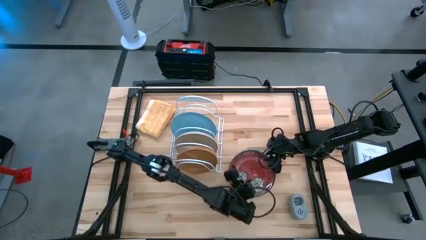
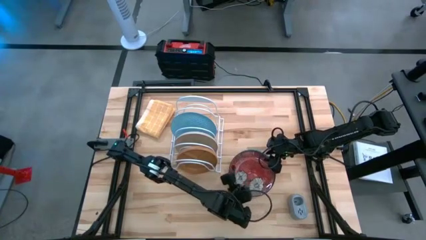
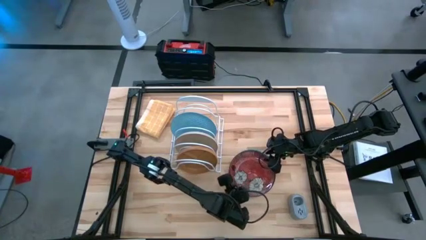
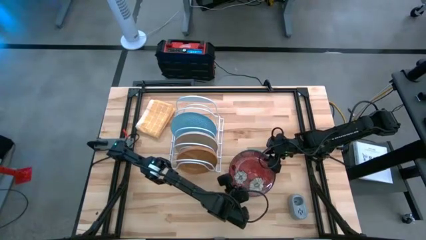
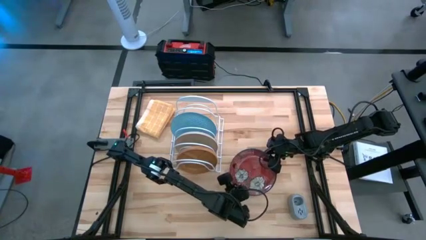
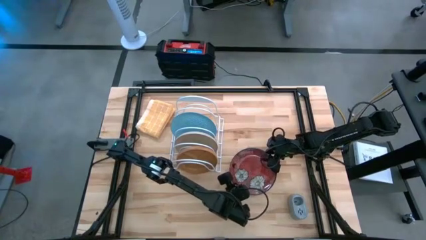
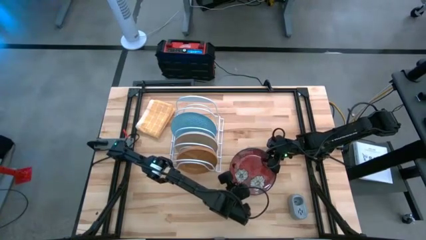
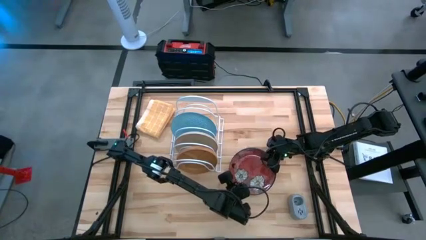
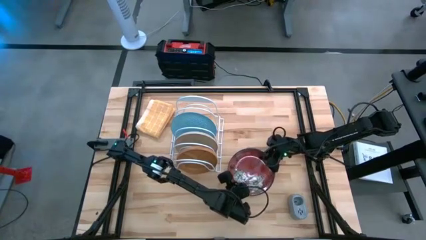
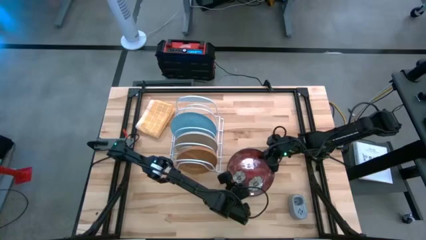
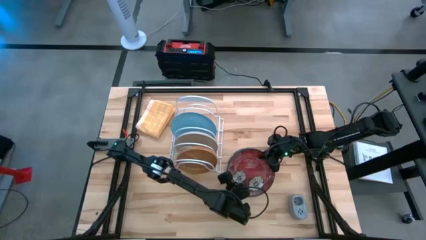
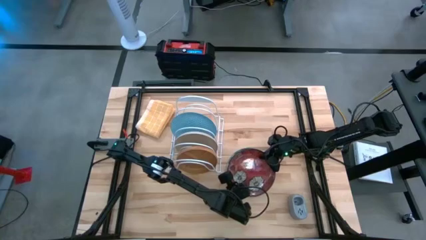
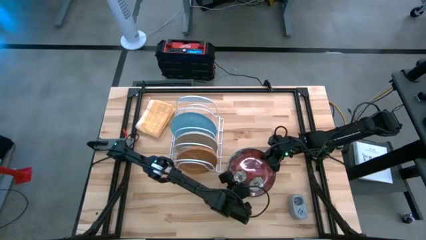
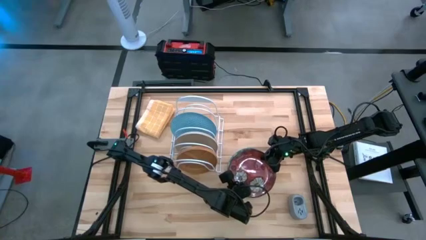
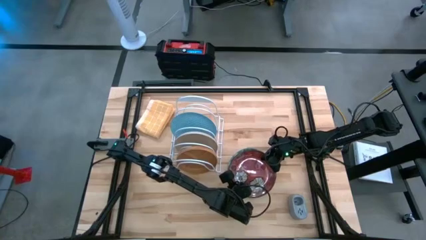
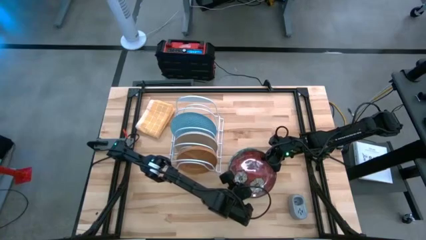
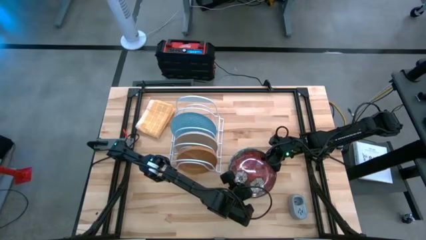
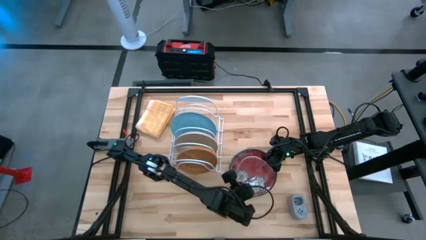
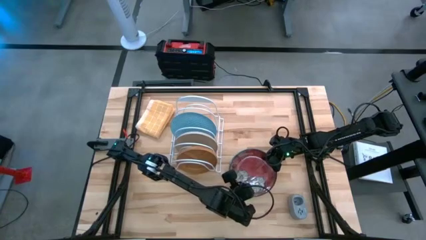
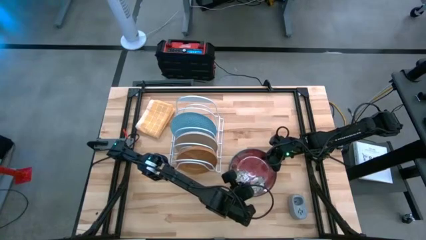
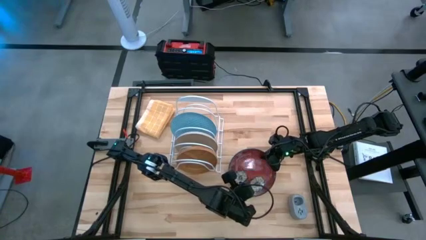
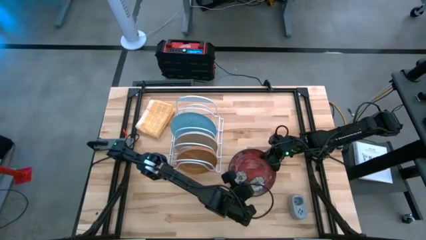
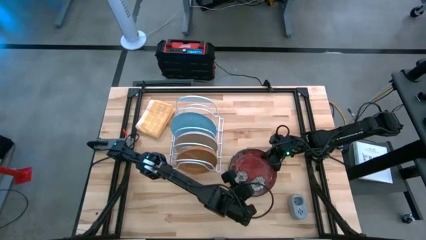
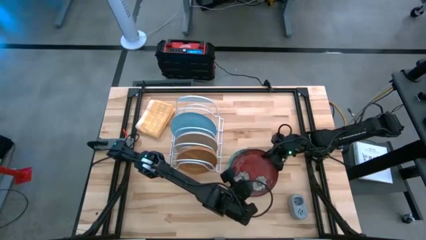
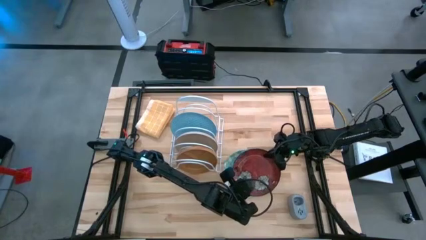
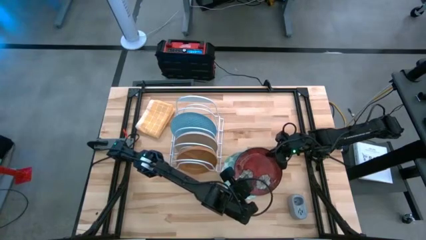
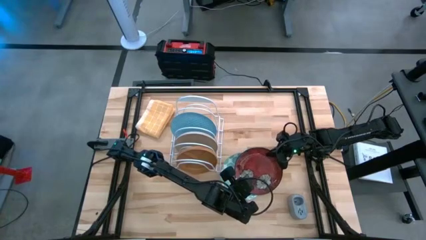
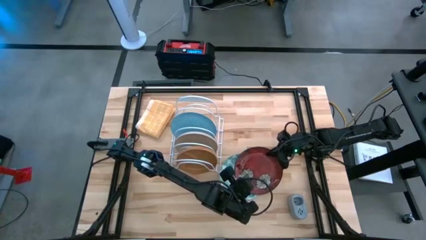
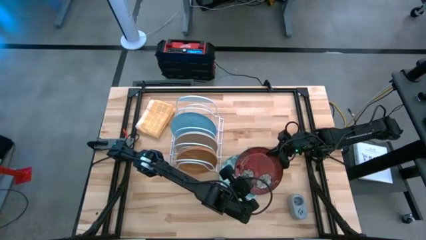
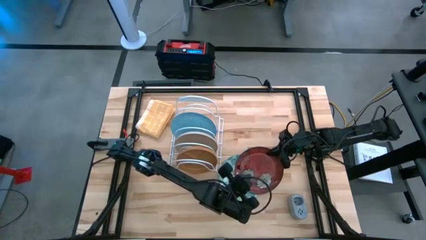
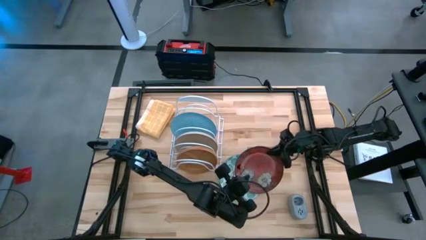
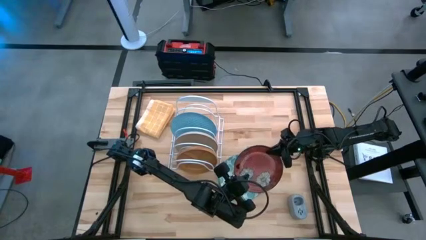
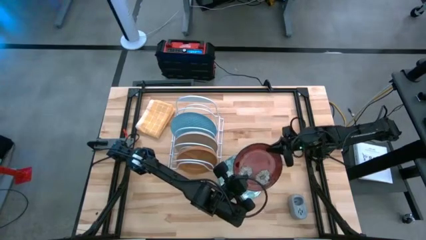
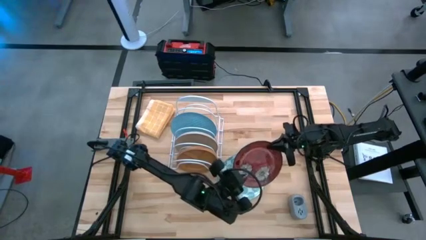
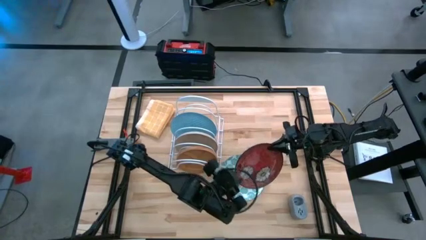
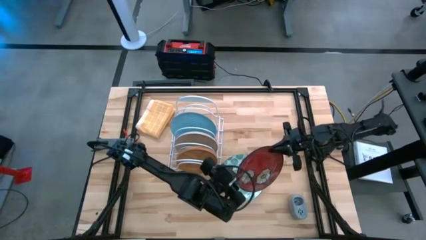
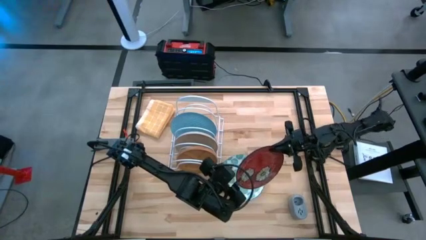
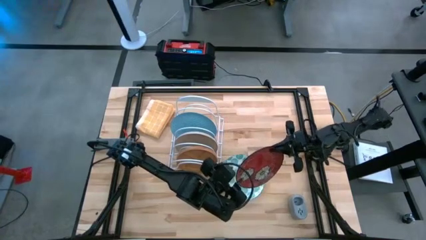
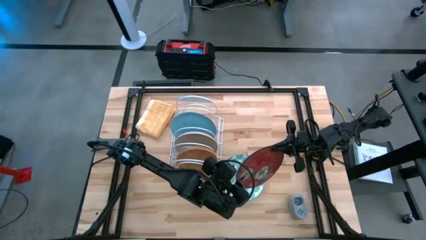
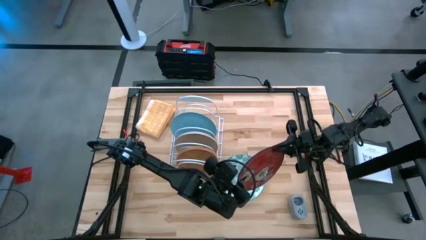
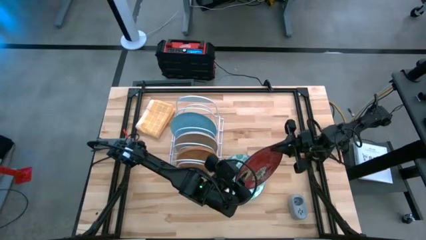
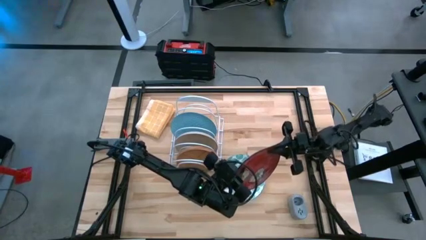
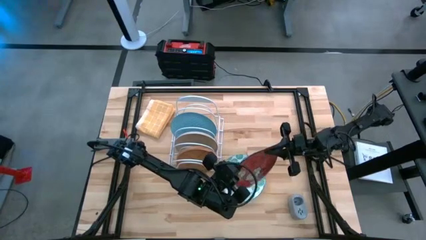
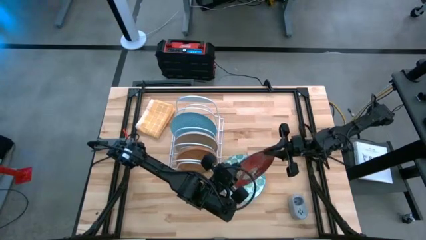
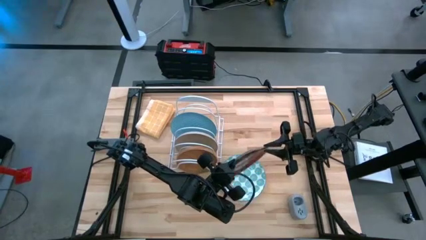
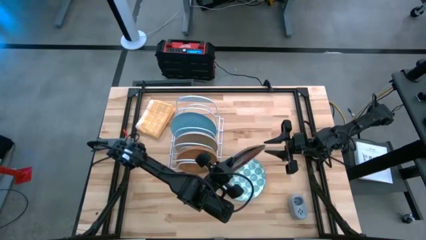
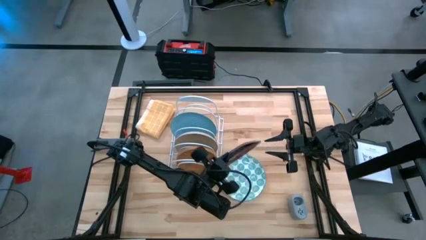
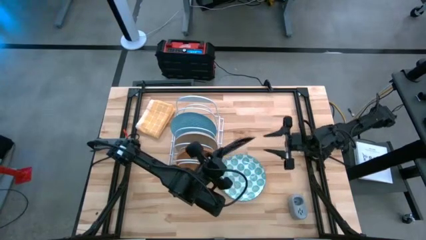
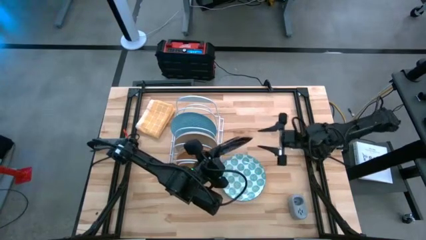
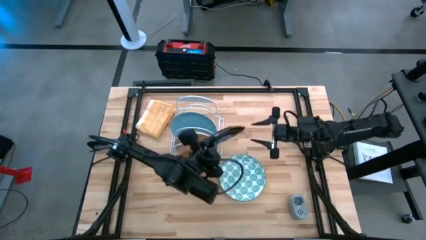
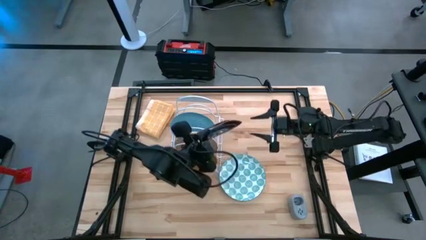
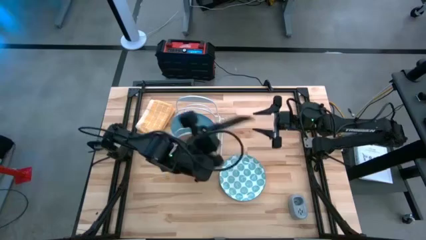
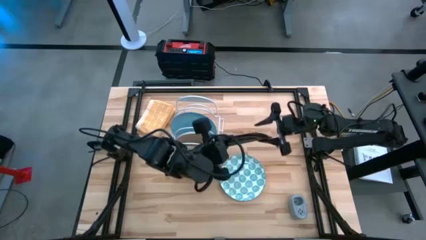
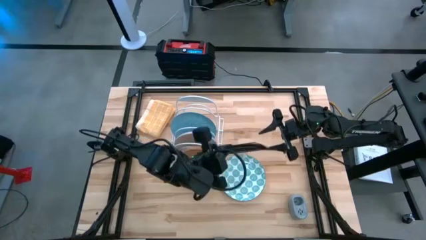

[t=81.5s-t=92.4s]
Task: Sort dishes
Put the red plate into the dishwasher rack

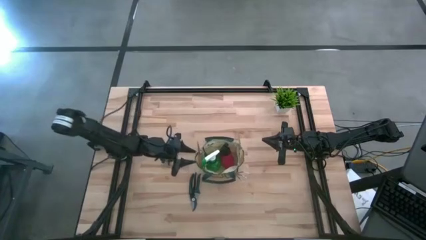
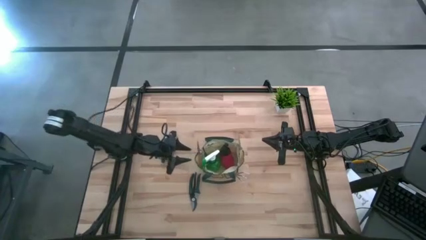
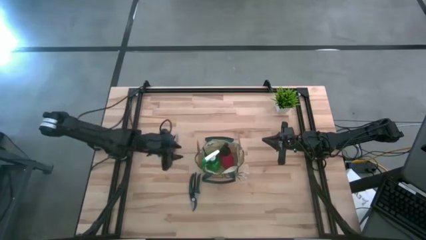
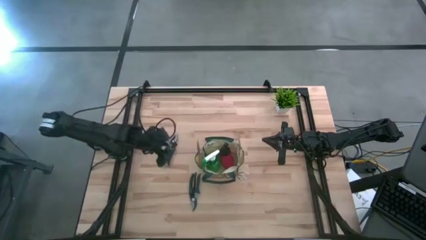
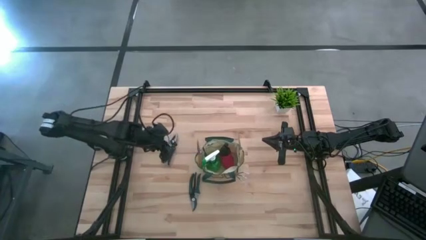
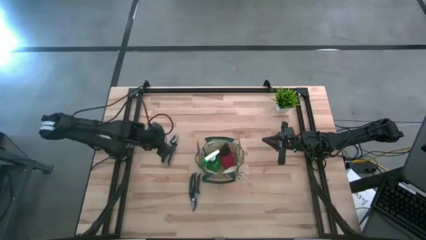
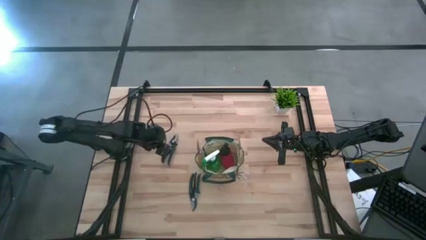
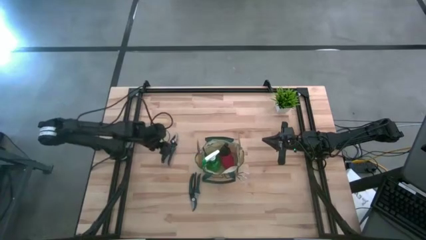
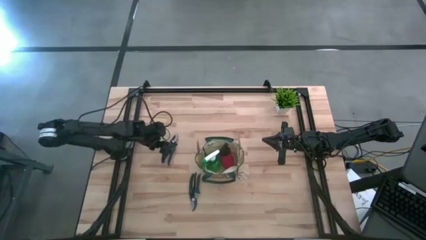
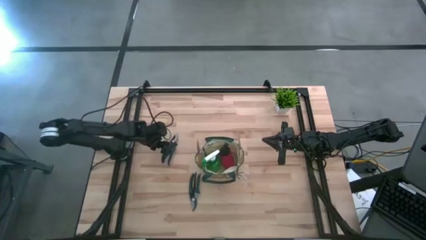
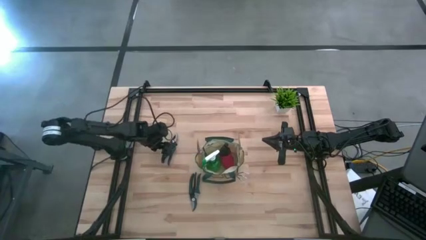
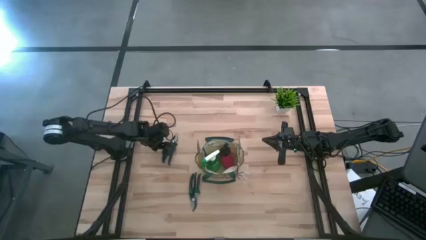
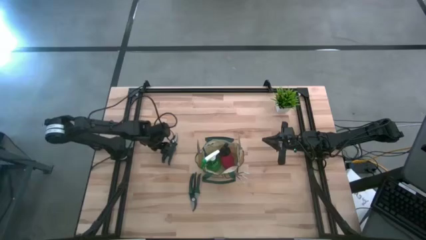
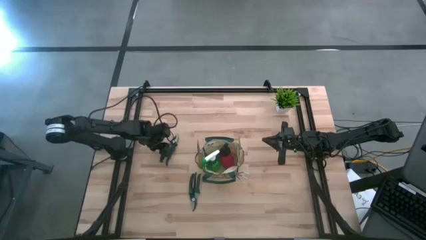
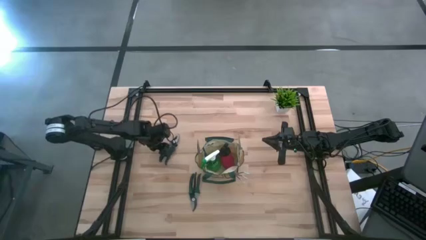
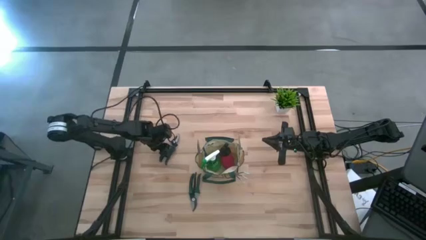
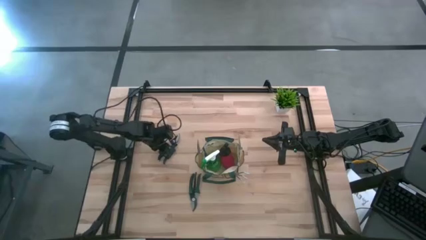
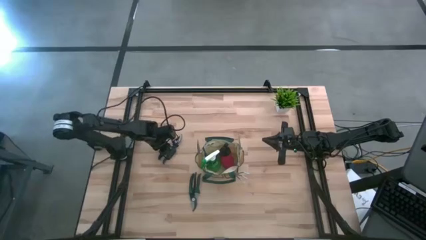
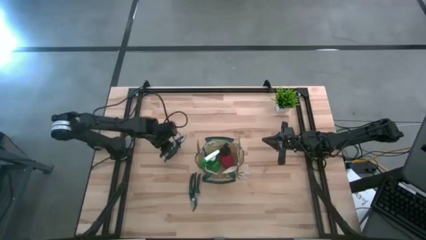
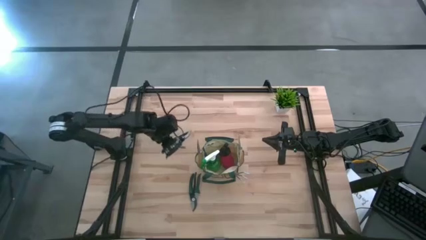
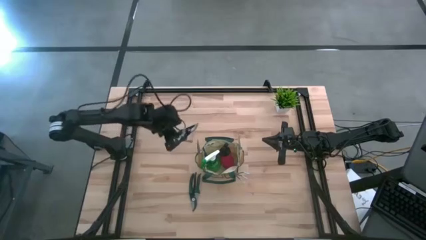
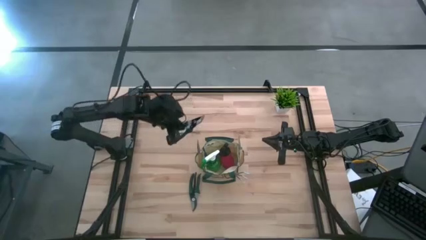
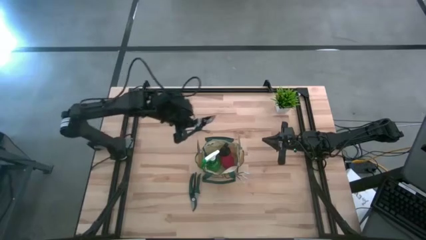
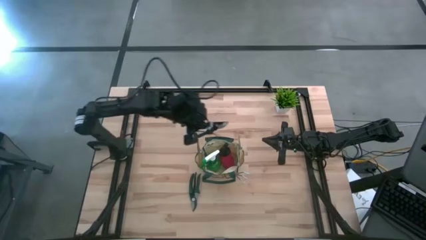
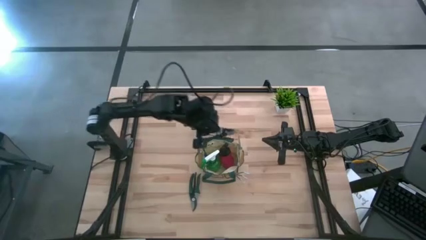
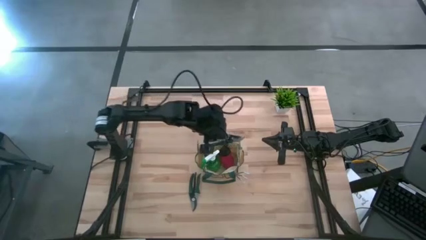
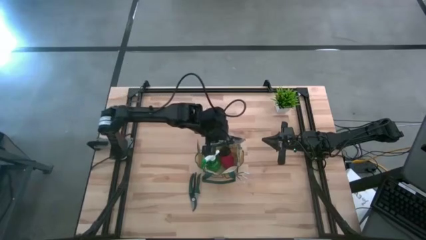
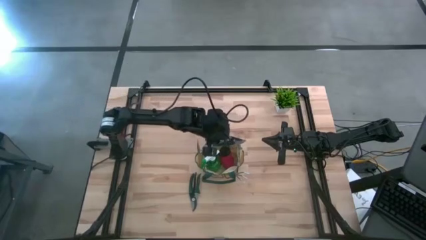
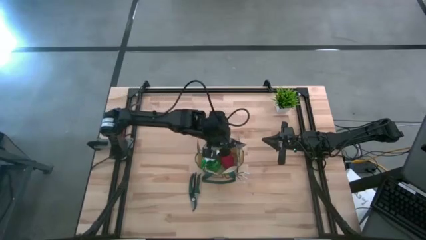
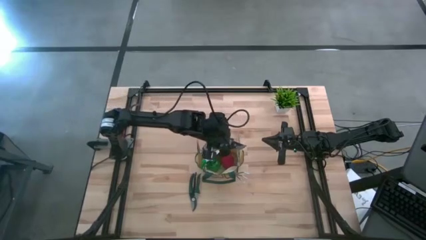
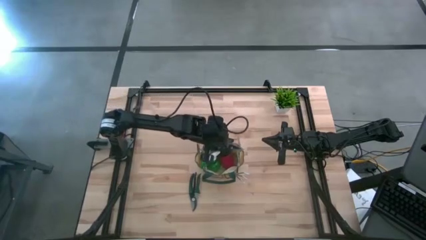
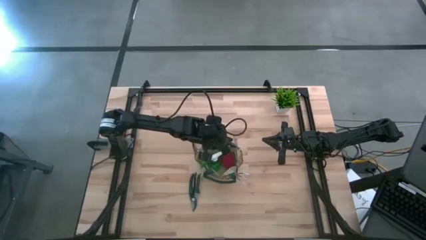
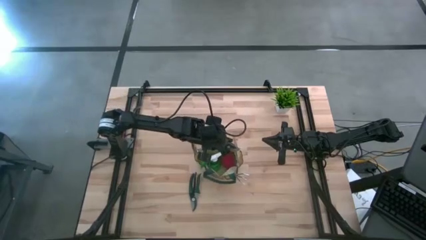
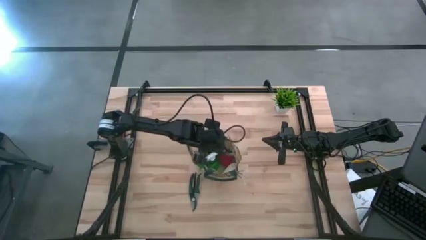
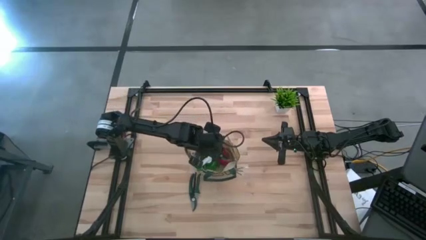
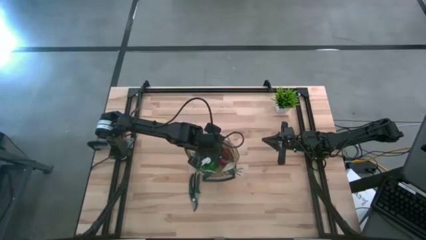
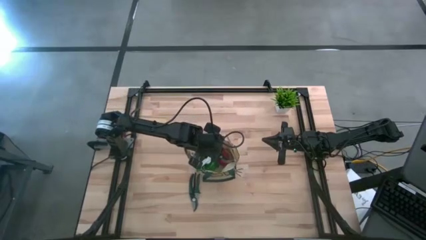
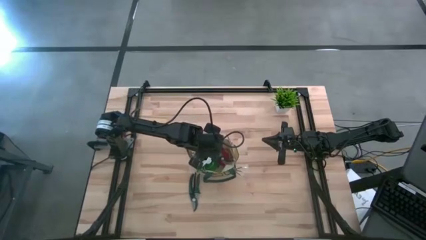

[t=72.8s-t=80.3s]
Task: Pick & Place Garden tools in Gardening bag
Put the top green fruit pruner into the white gardening bag
